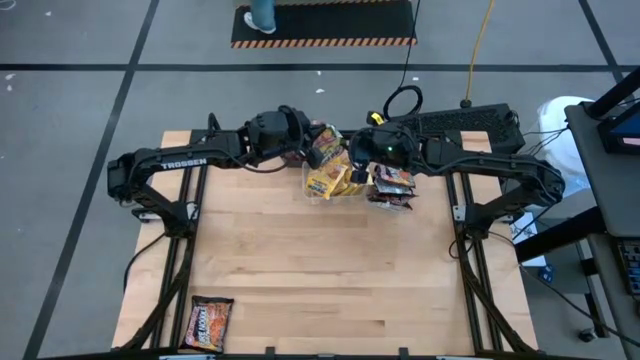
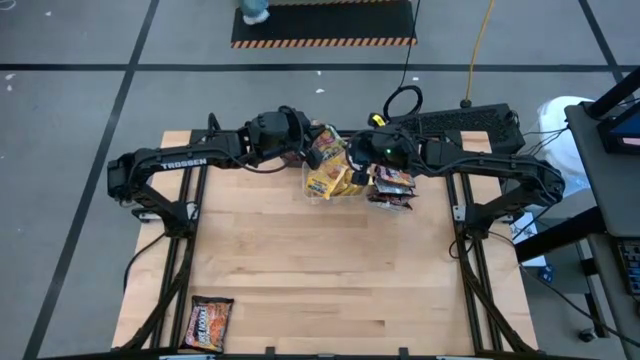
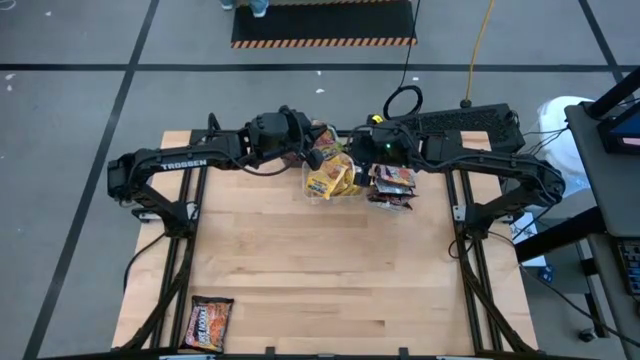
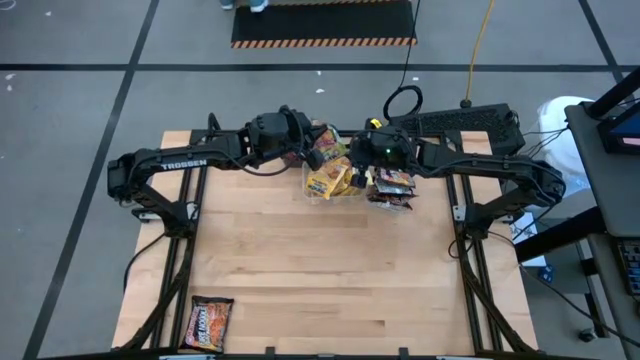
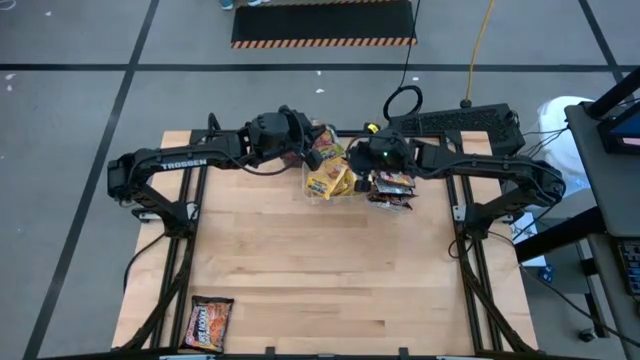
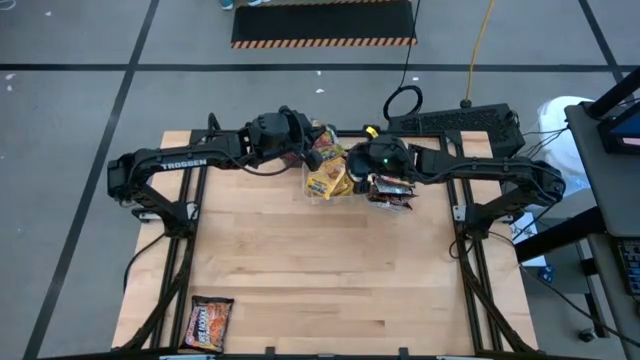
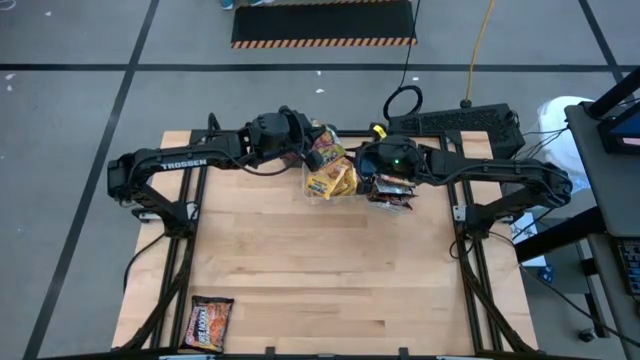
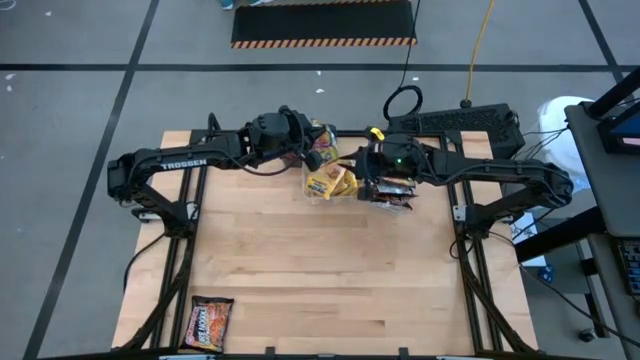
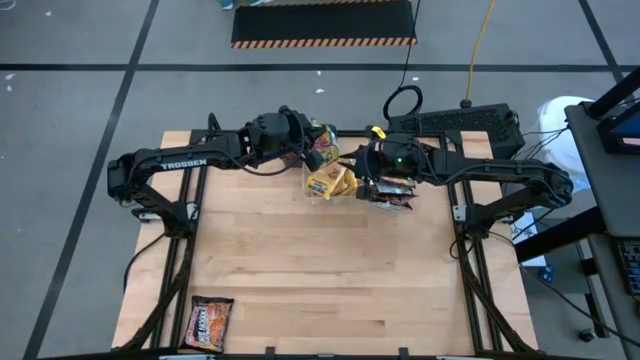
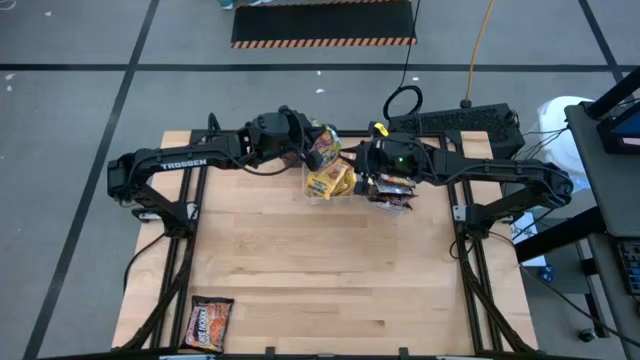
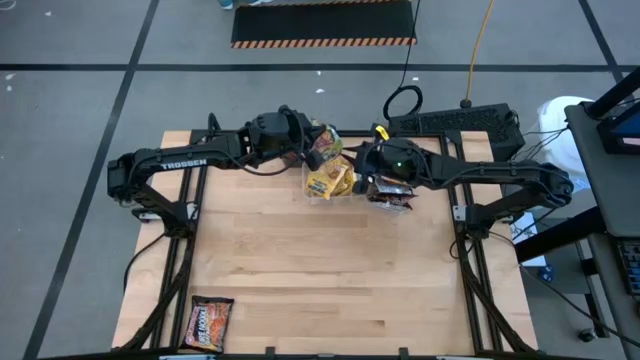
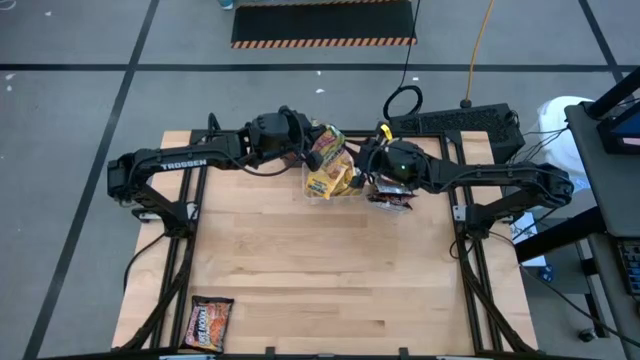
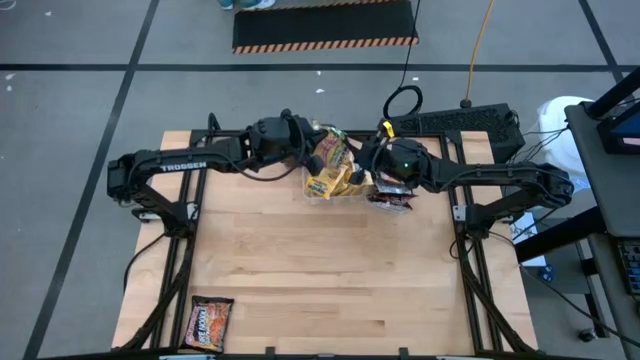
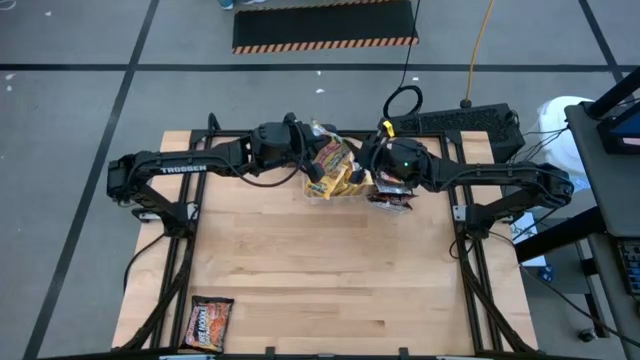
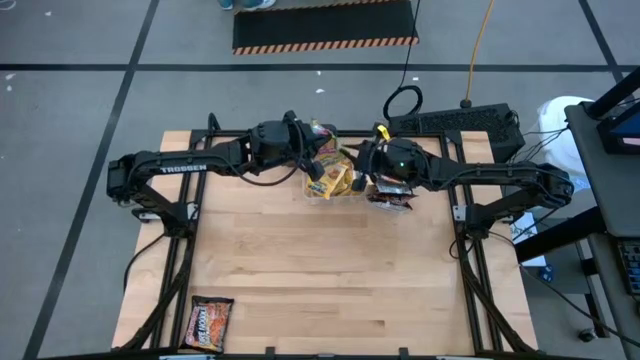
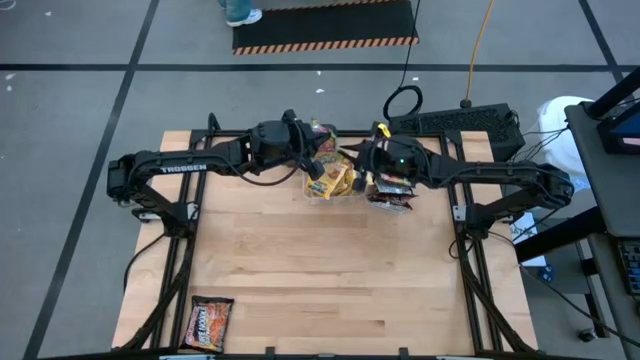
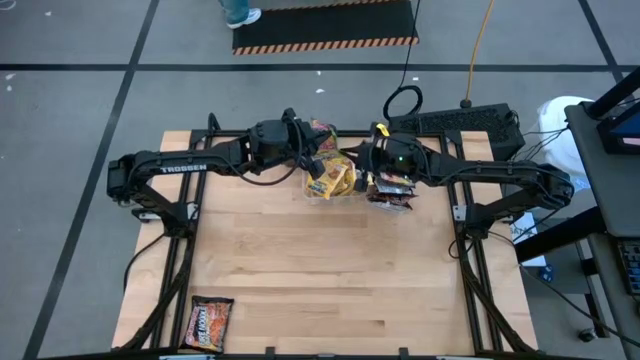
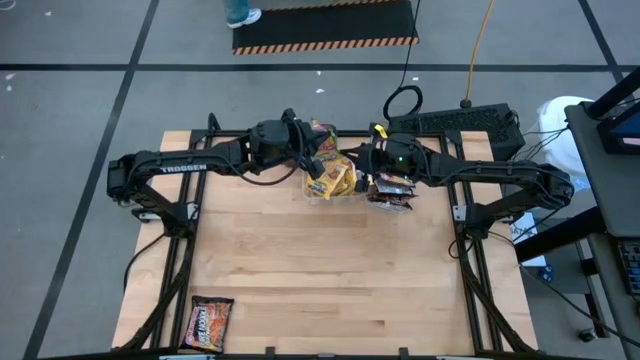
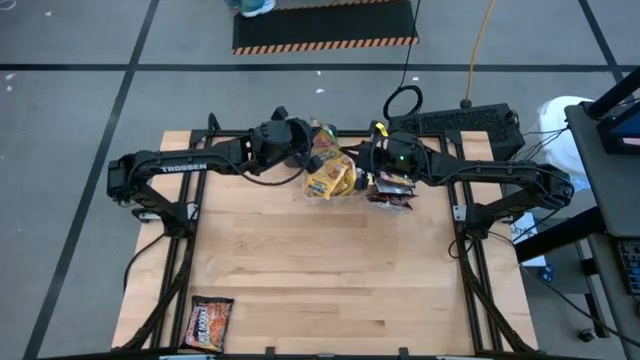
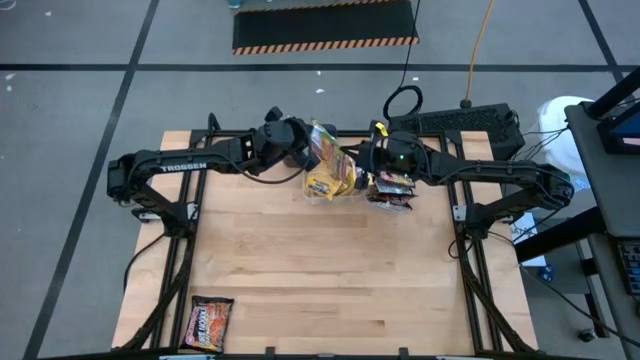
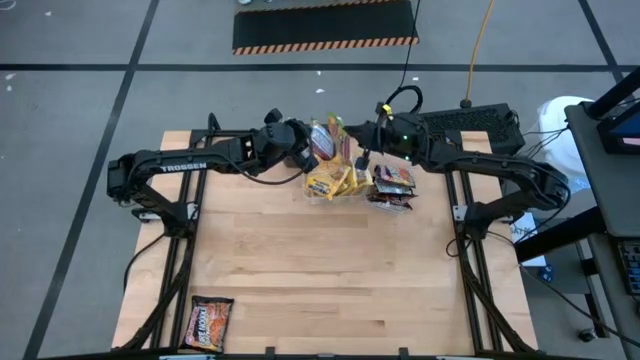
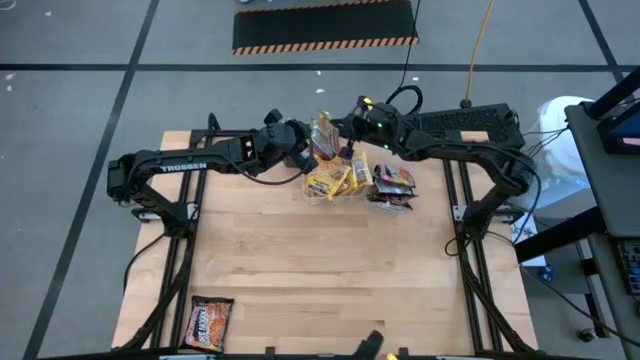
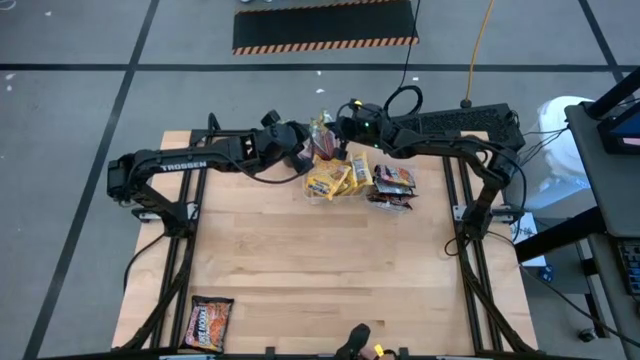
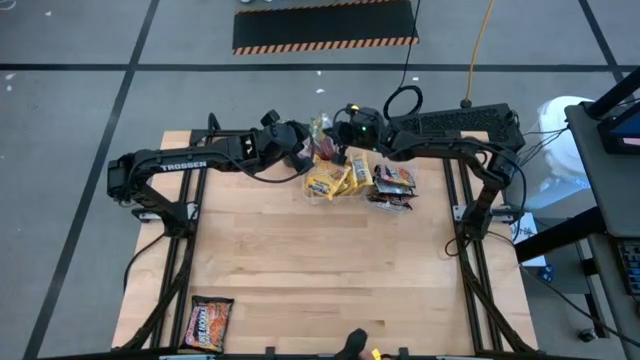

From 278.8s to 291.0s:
Task: Sort Maruchan noodles
Put the green noodle pack into the black bin

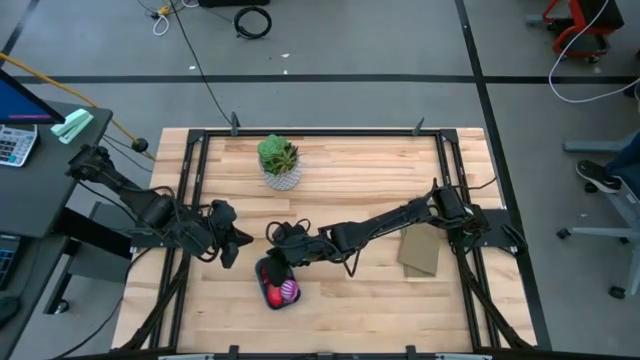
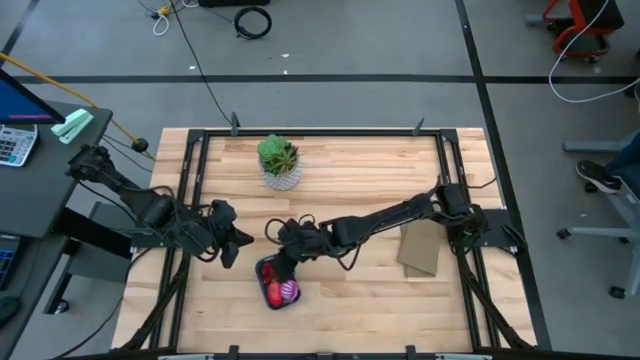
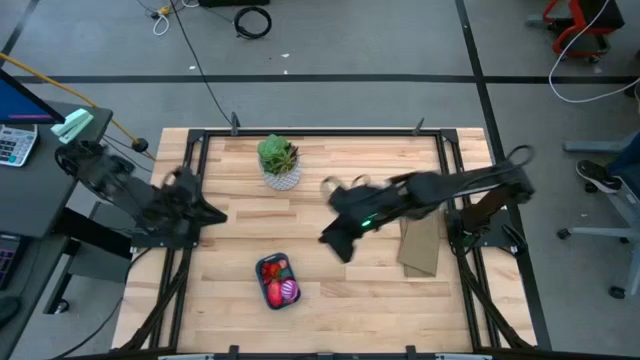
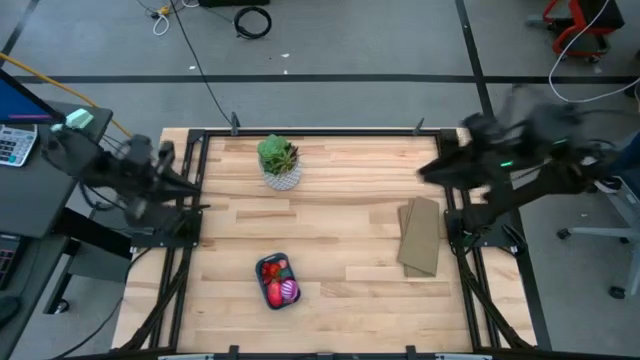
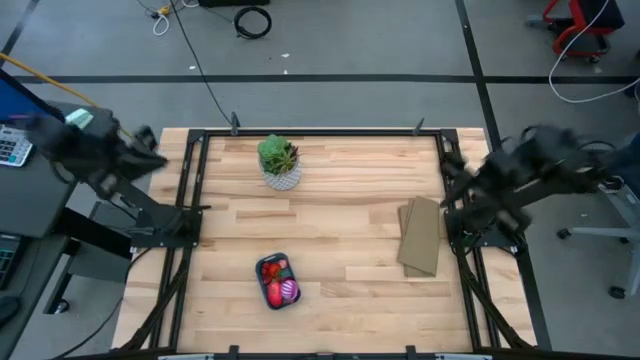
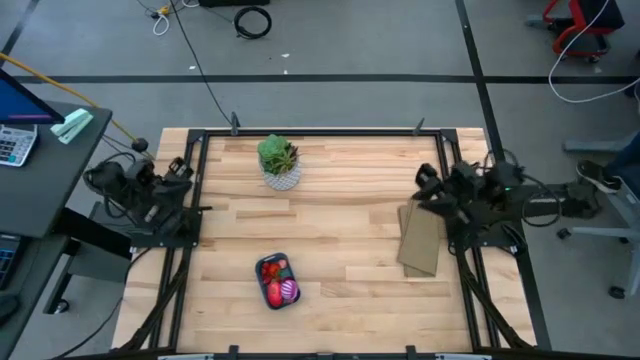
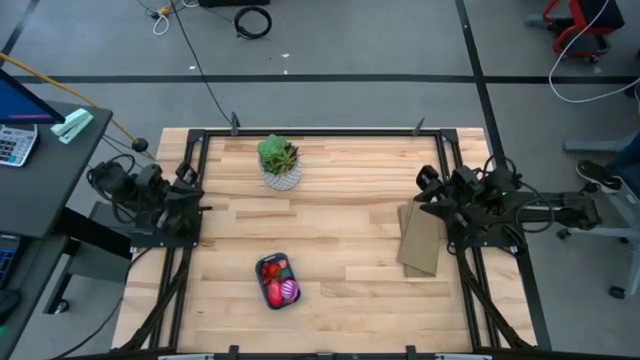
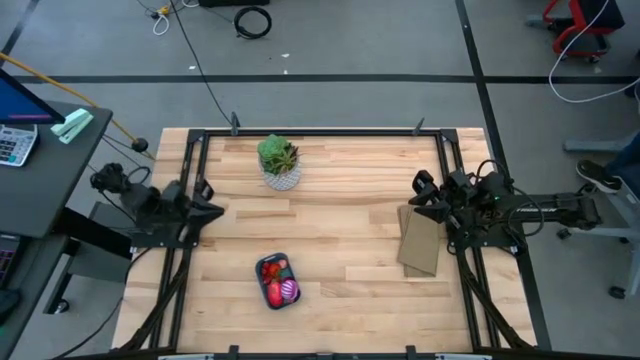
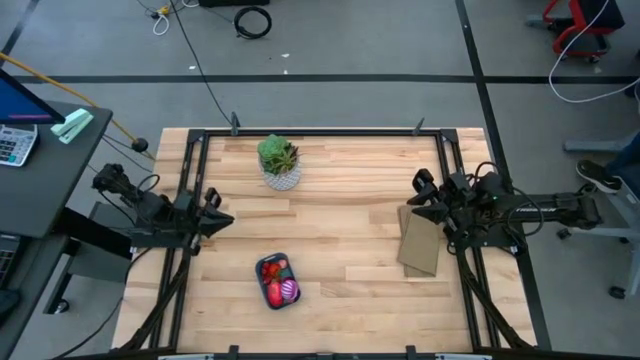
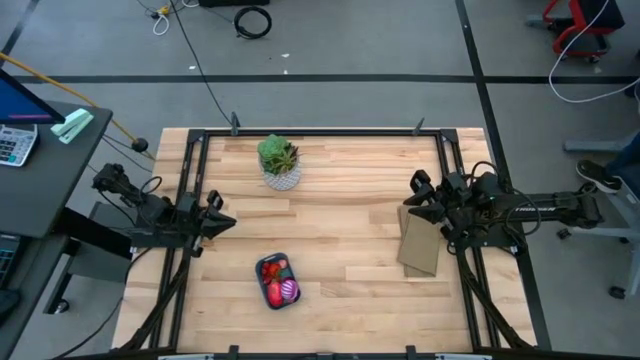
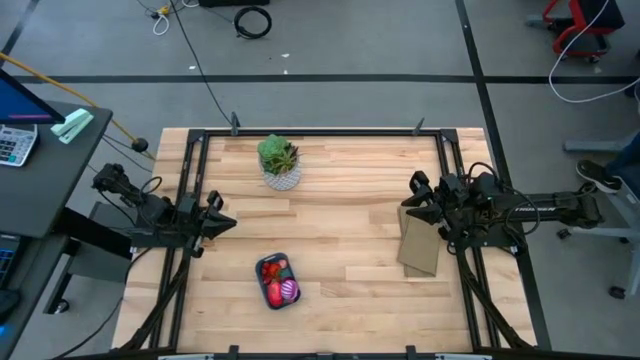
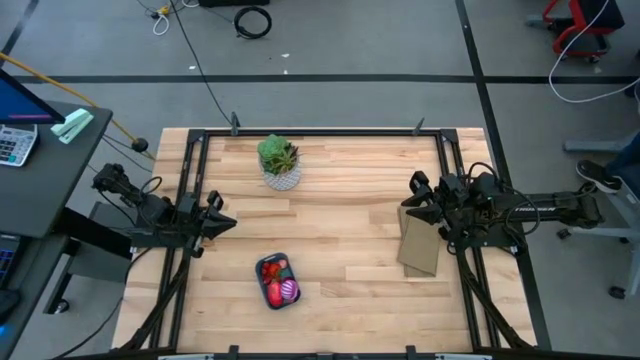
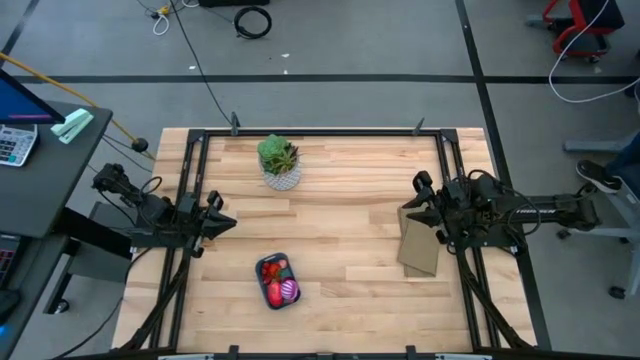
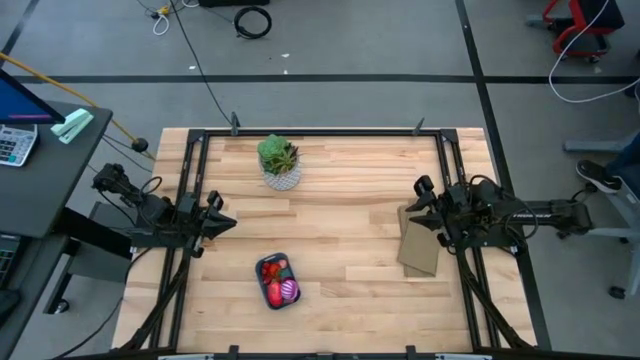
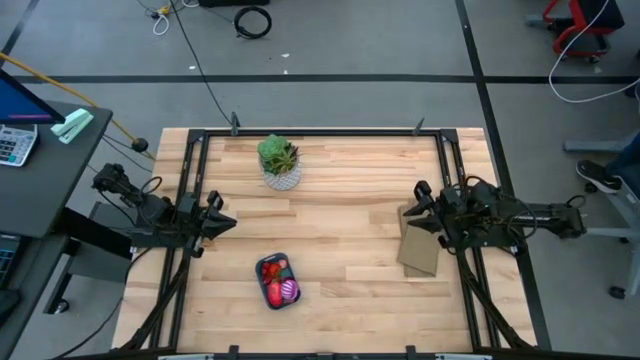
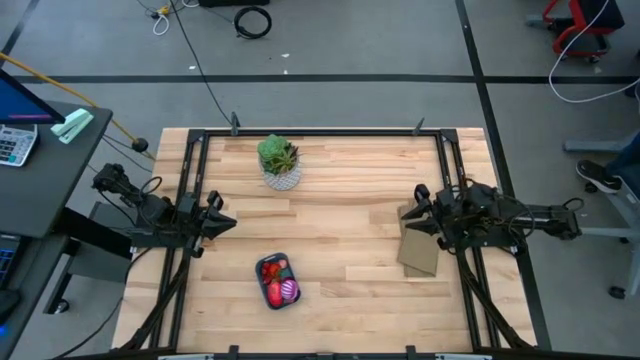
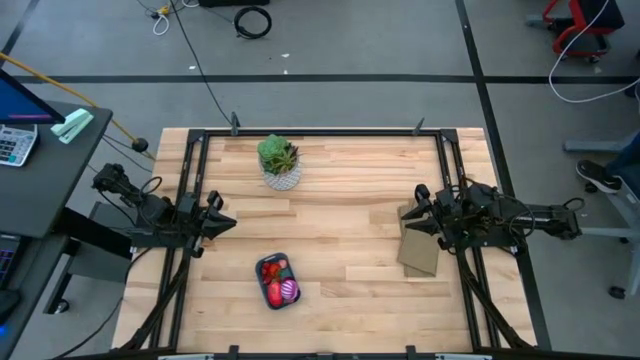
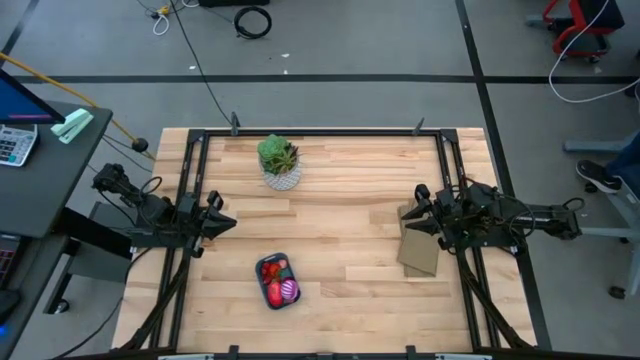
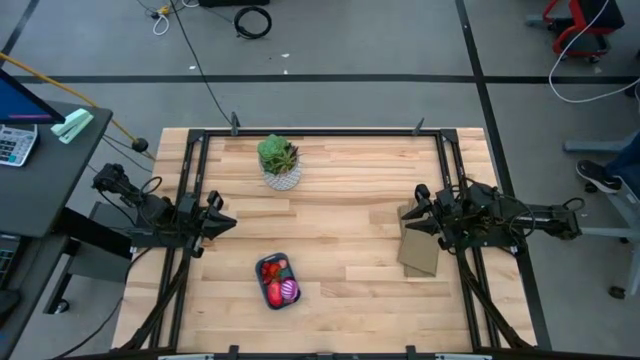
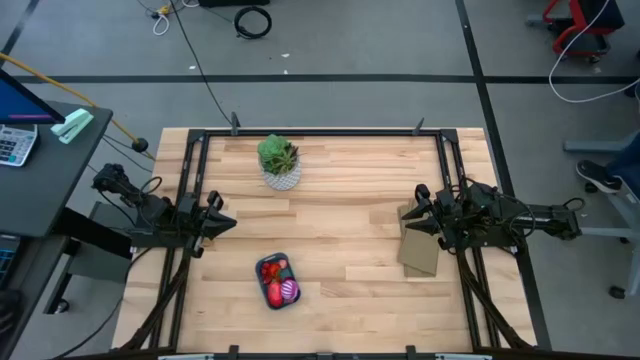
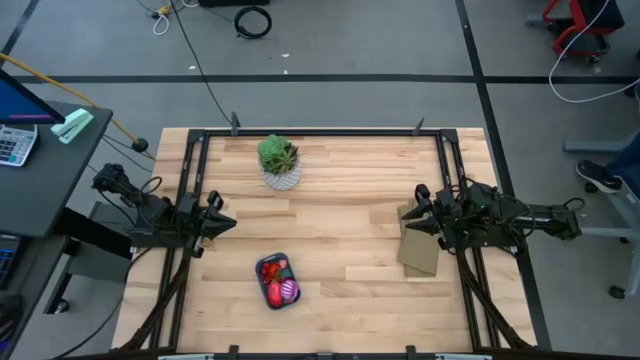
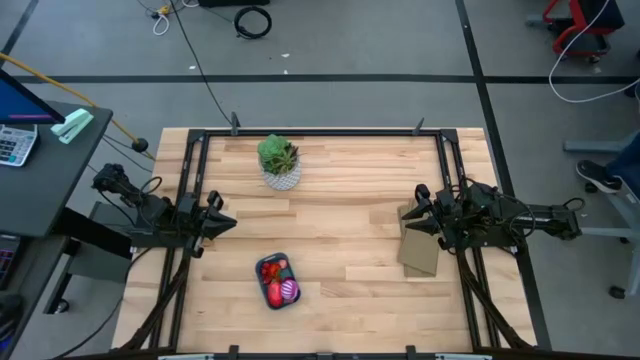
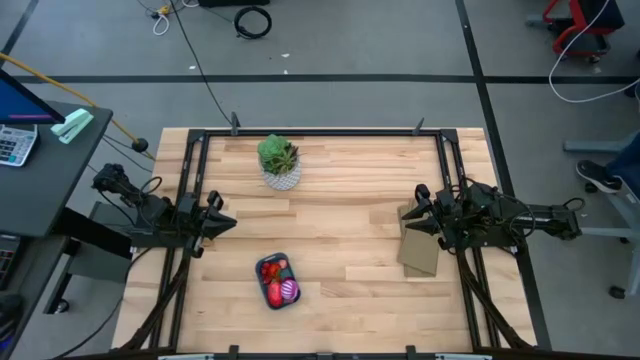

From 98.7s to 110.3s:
Task: Pick and placing Produce into tupperware
Return to Home Position
